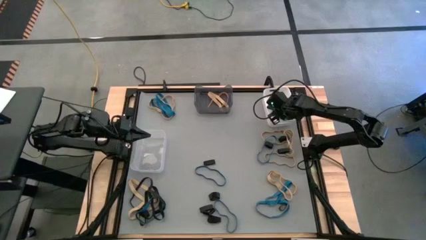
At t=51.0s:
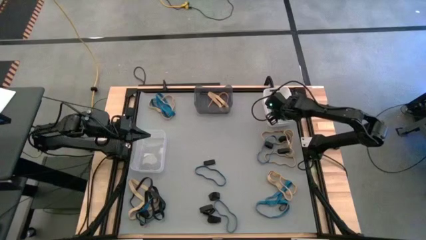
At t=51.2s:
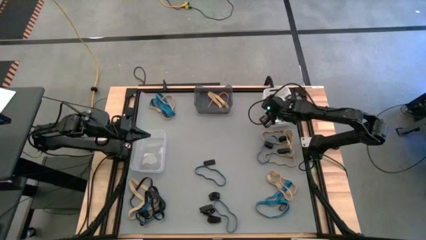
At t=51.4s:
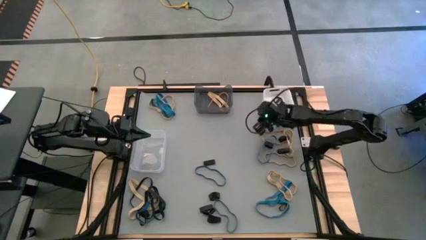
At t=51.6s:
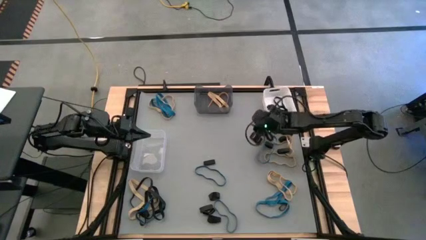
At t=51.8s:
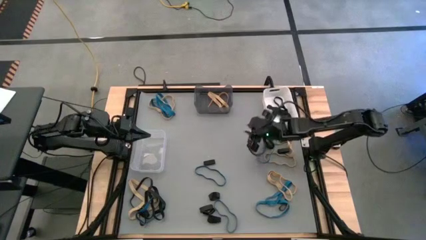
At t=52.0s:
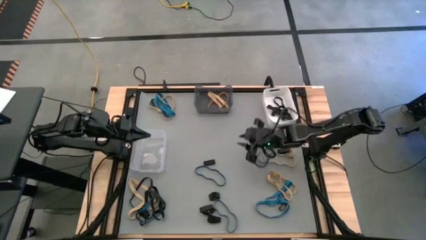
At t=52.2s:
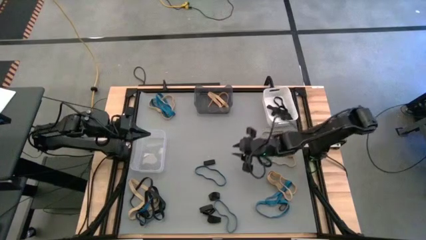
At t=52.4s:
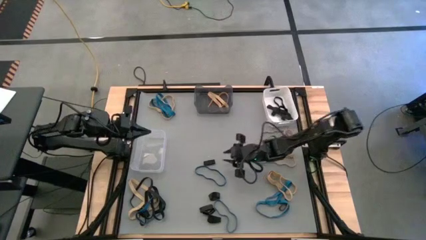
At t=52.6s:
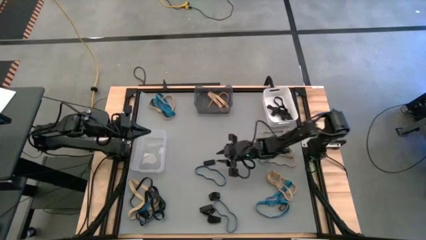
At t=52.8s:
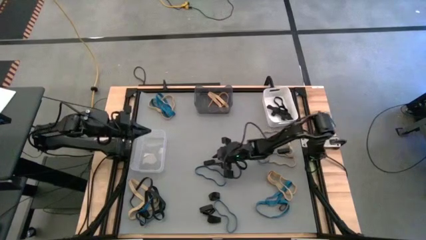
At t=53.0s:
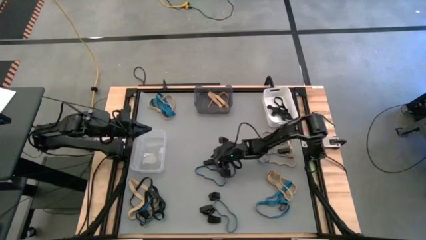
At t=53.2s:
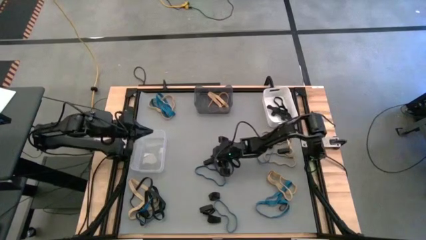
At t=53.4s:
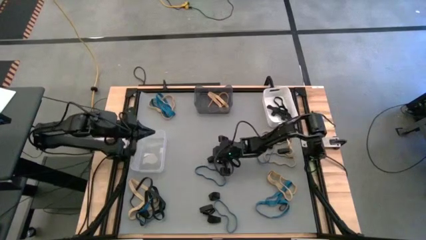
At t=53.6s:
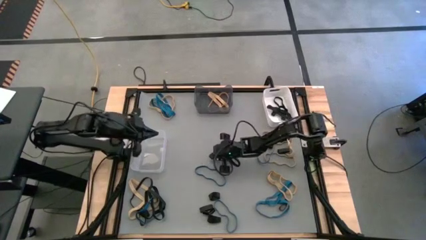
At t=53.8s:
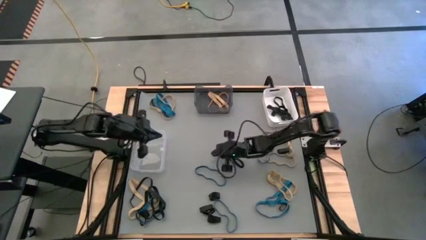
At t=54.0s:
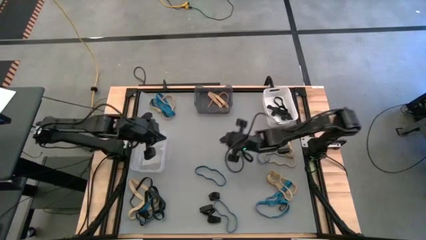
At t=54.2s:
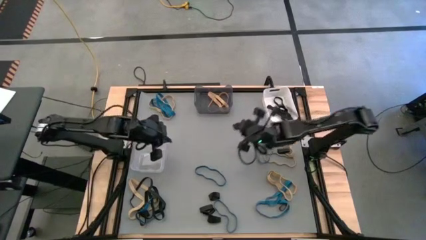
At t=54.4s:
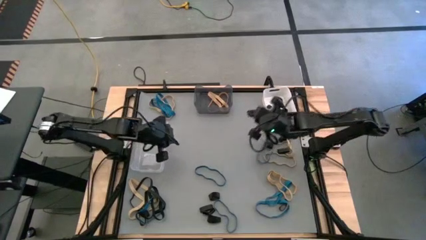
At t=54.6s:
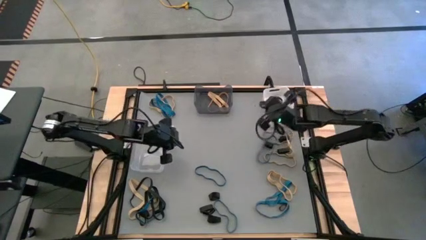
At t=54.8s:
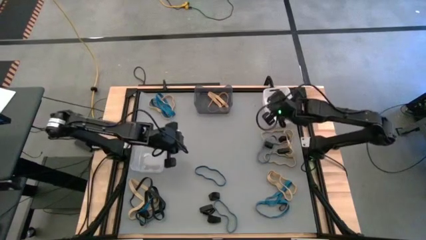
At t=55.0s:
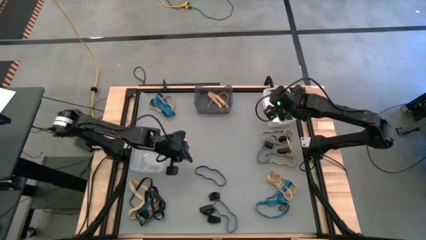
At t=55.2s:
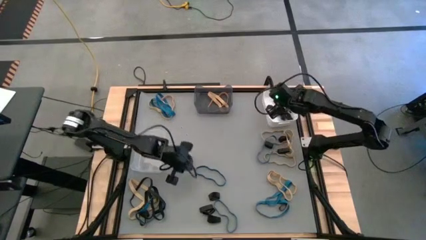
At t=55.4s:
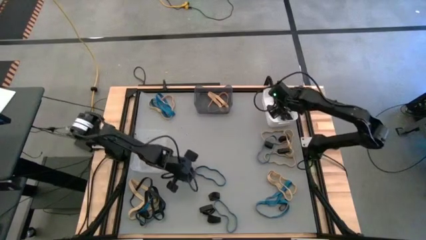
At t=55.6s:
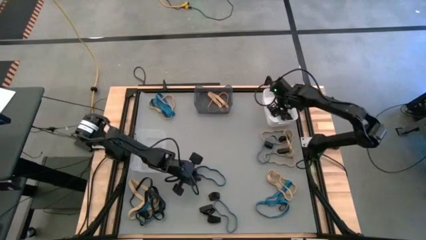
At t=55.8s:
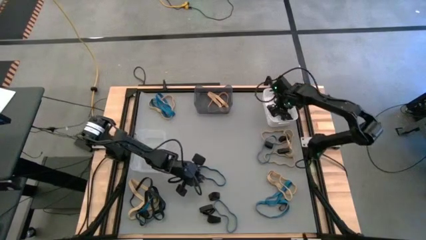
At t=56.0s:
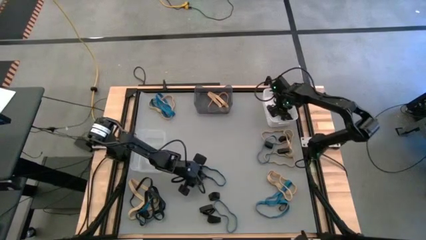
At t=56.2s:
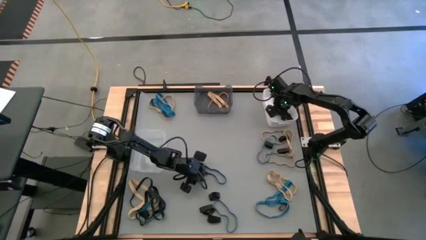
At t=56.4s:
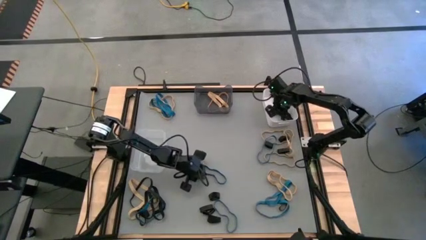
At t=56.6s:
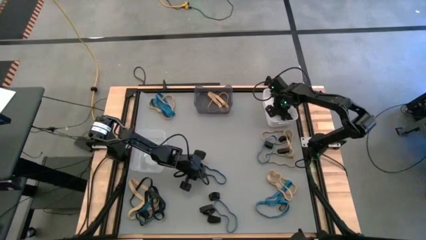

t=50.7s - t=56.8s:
Task: Sort rubber bands into baskets
Put the black rubber band into the white bin

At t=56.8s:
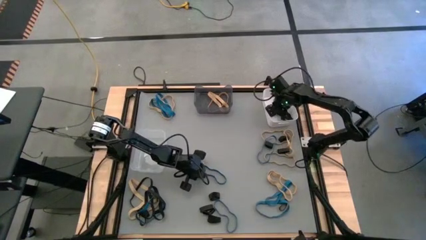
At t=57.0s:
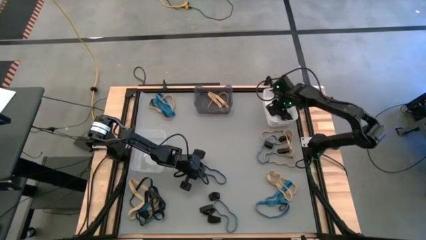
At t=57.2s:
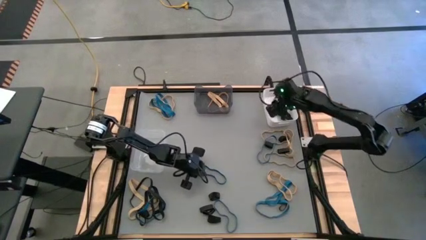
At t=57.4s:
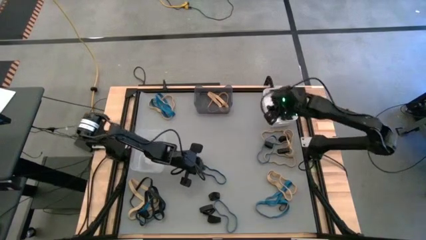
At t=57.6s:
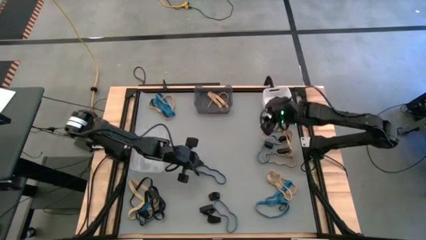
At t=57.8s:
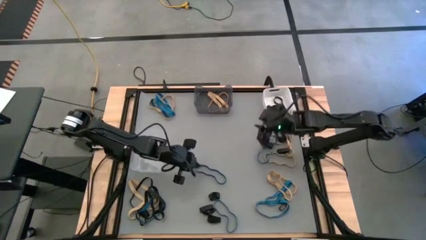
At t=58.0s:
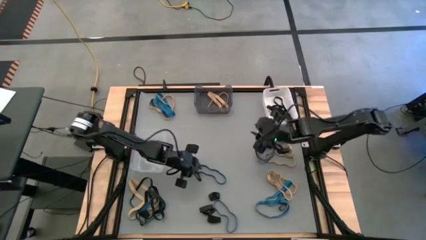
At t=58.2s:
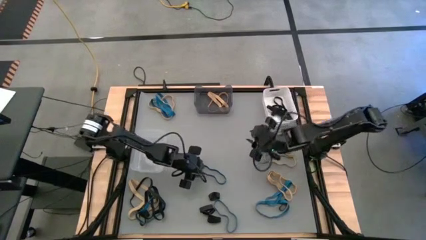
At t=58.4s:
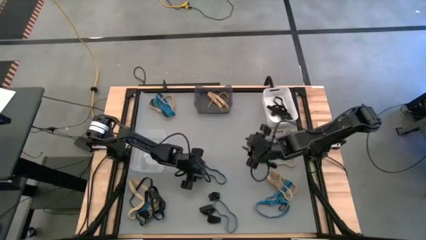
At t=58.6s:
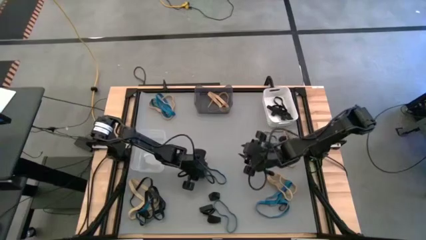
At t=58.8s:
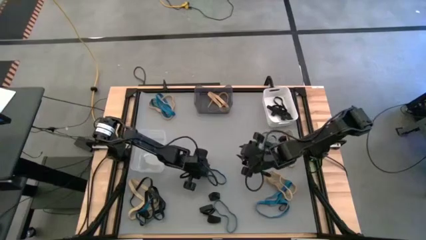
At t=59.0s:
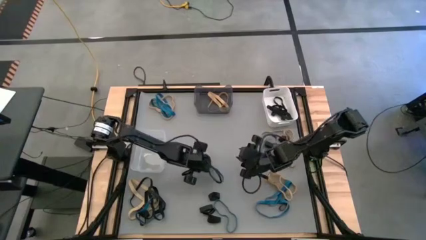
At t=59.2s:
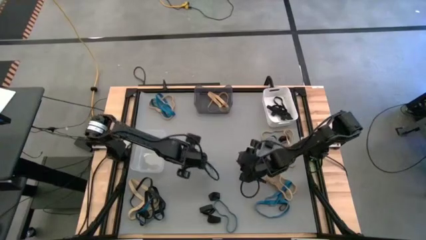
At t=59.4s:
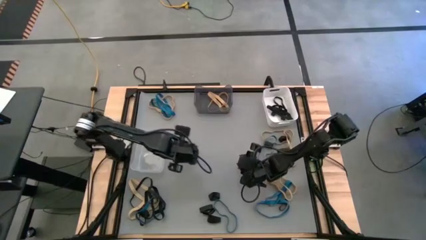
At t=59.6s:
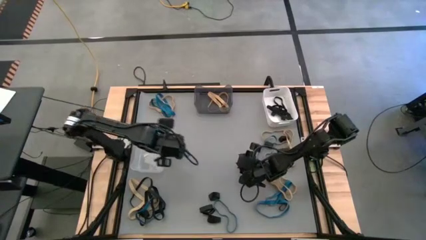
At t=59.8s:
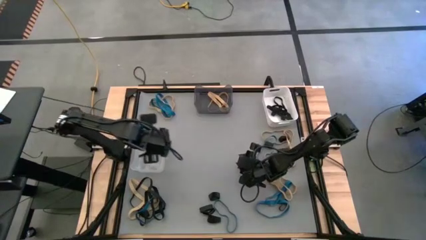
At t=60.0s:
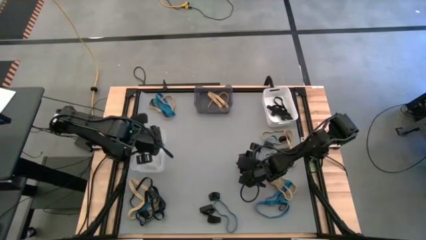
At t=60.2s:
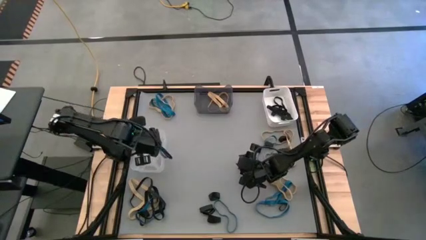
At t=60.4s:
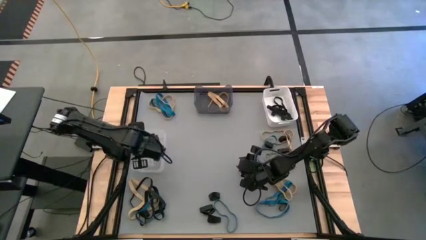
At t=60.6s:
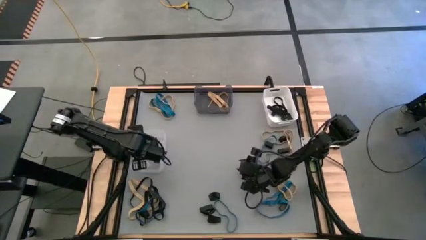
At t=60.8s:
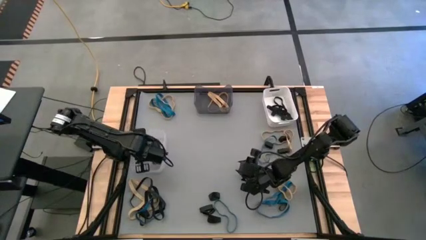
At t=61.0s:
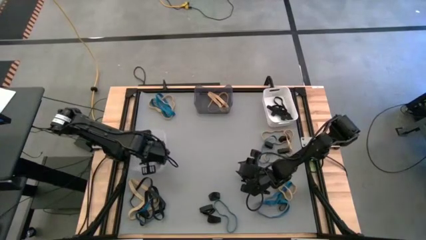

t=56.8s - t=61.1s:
Put the blue rubber band into the transparent bin

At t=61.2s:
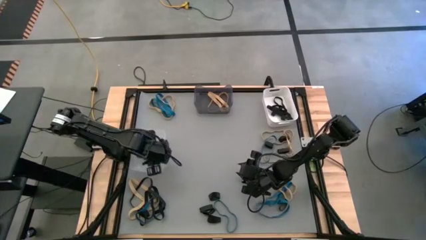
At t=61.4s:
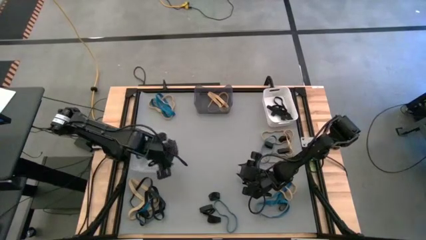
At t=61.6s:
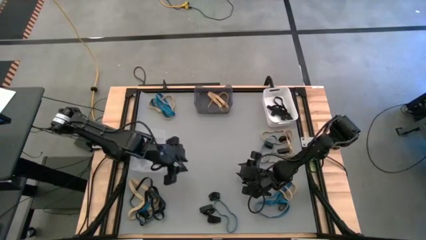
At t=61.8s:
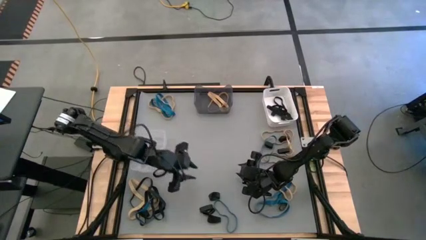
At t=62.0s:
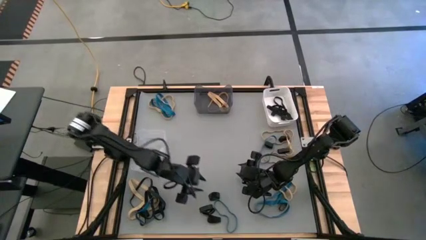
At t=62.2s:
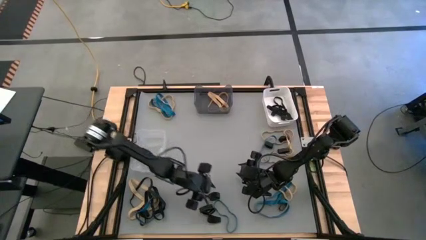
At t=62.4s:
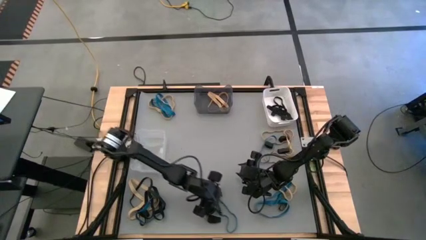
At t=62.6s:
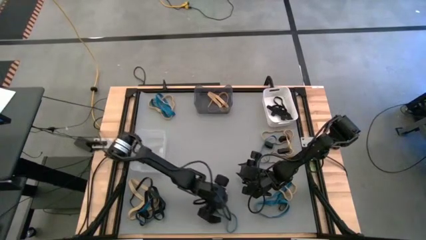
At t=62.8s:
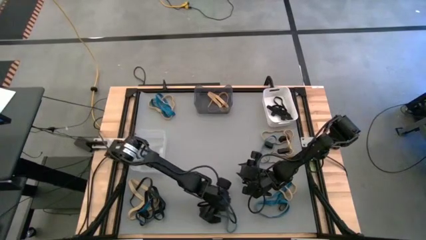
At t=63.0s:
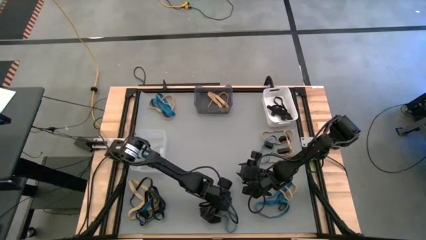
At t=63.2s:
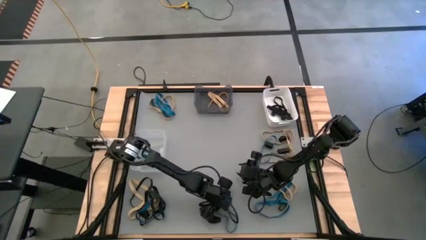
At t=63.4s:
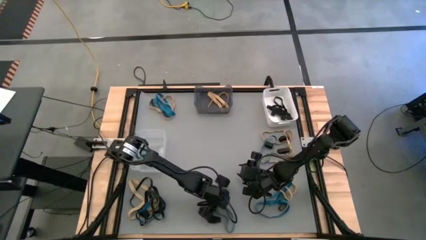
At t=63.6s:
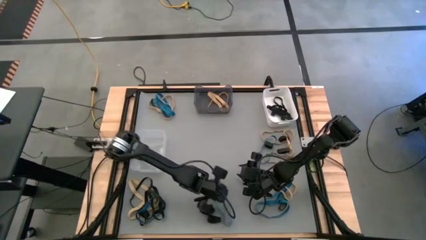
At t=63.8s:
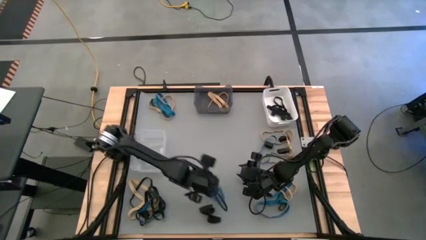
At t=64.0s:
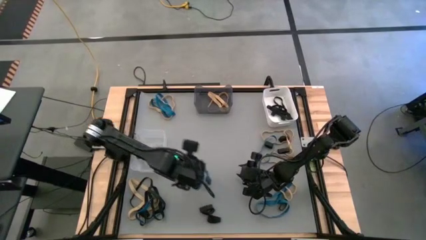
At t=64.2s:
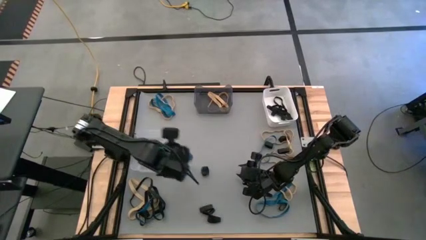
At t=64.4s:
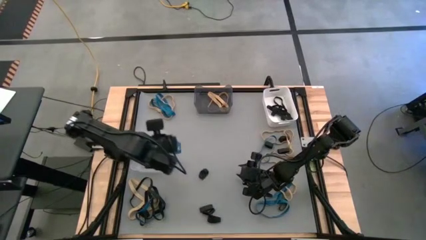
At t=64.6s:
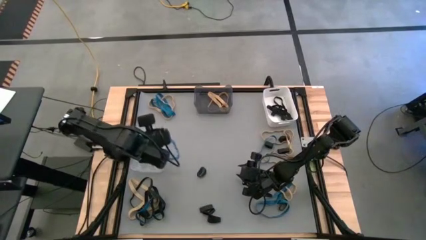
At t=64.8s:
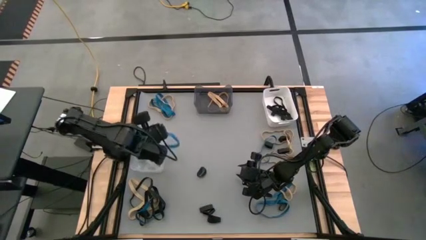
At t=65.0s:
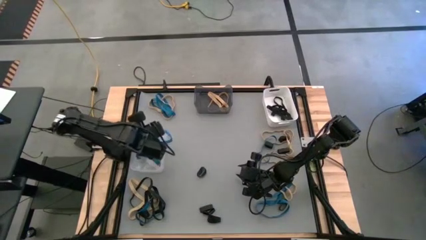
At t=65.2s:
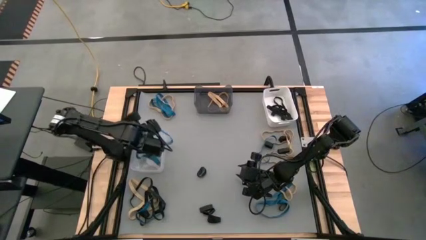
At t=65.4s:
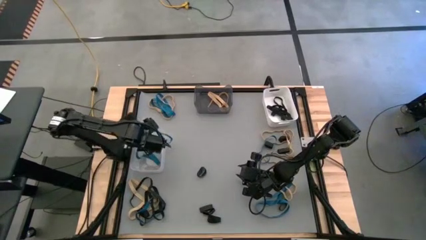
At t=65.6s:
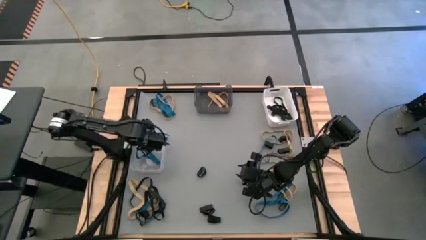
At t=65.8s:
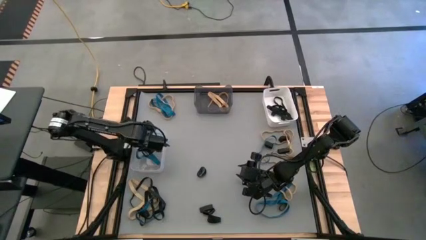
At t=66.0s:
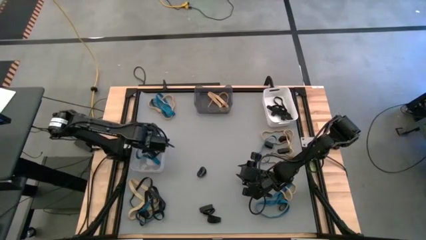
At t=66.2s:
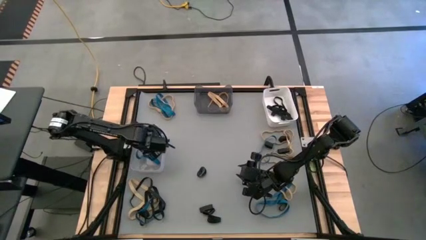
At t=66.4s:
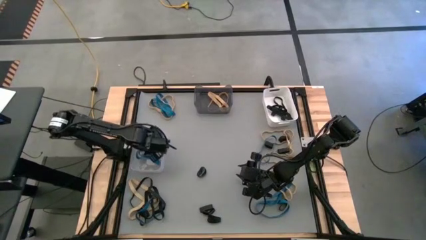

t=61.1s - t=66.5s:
Put the blue rubber band into the transparent bin
